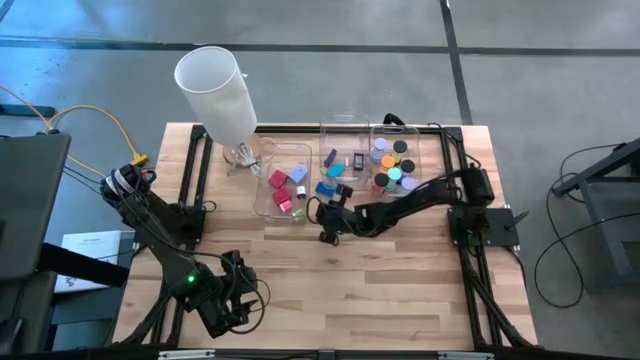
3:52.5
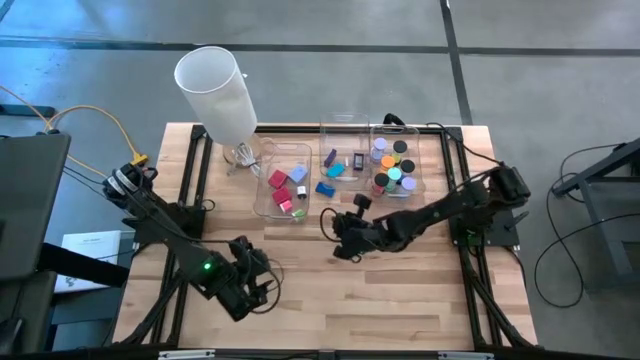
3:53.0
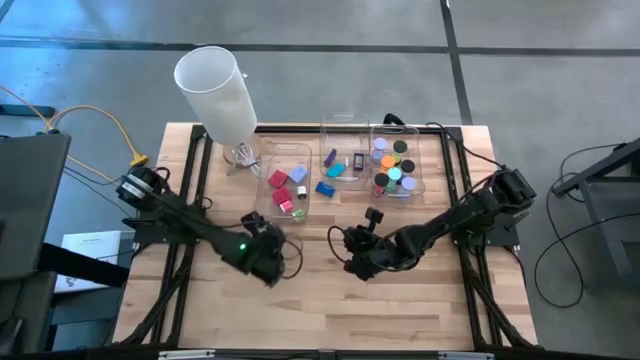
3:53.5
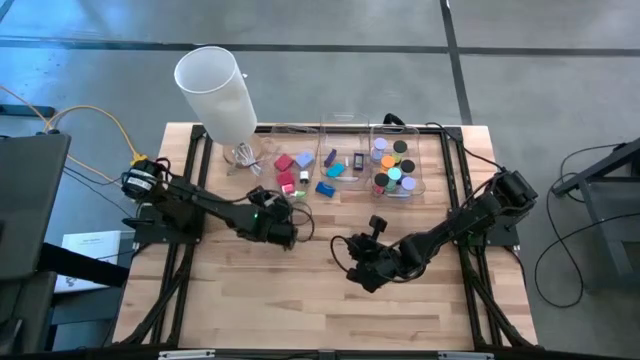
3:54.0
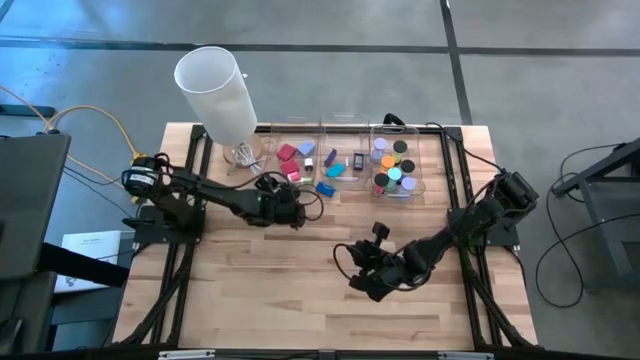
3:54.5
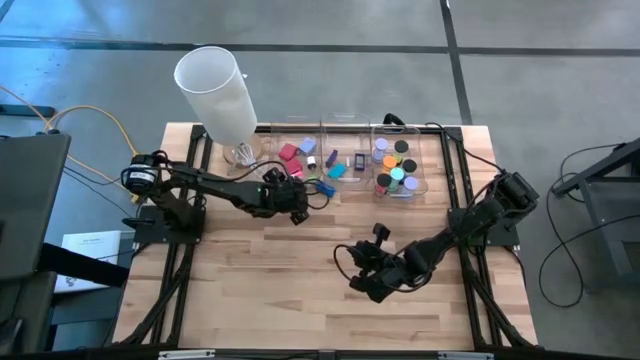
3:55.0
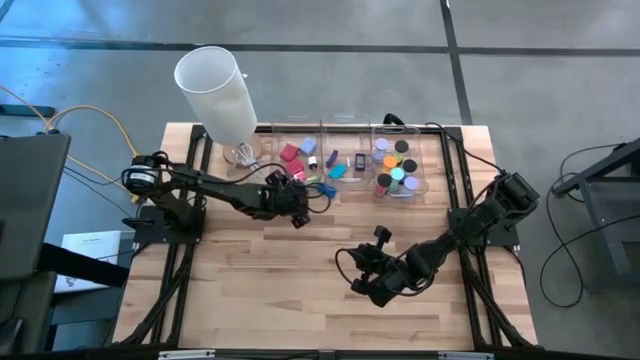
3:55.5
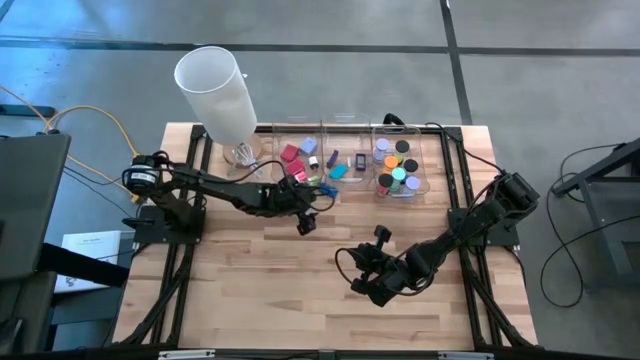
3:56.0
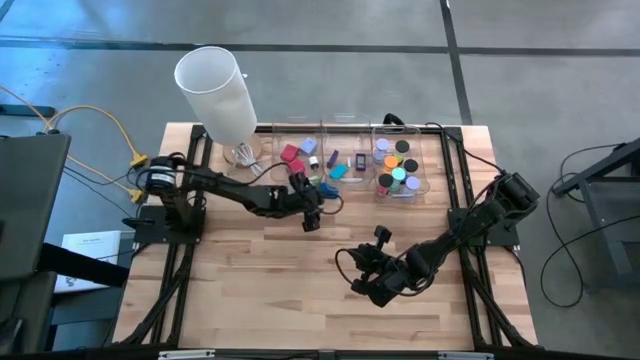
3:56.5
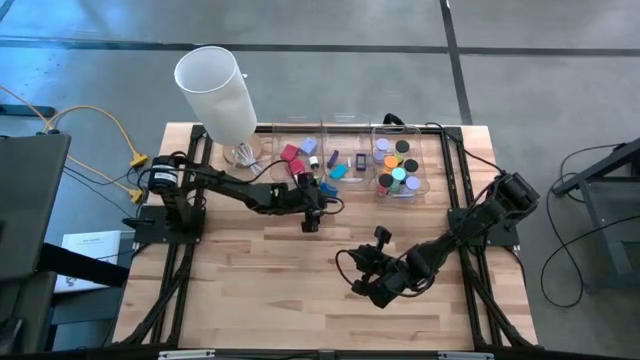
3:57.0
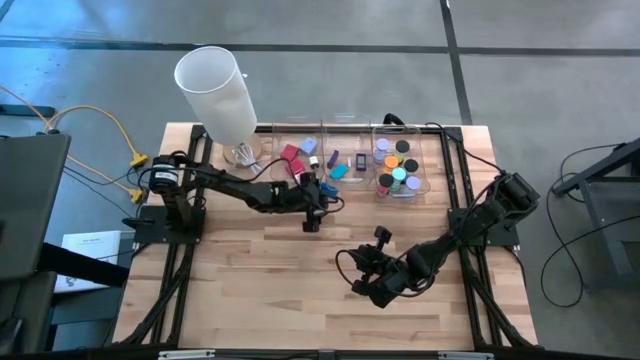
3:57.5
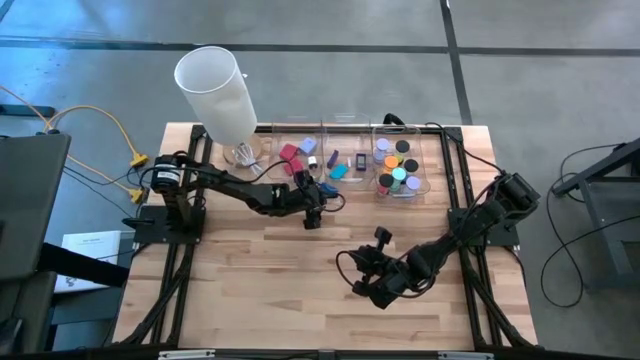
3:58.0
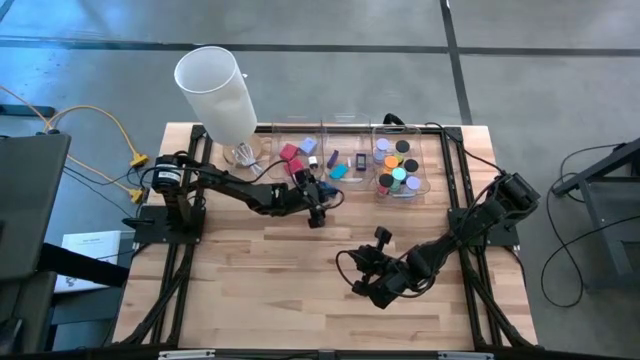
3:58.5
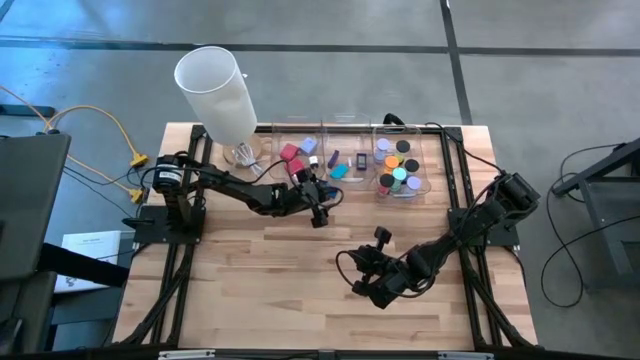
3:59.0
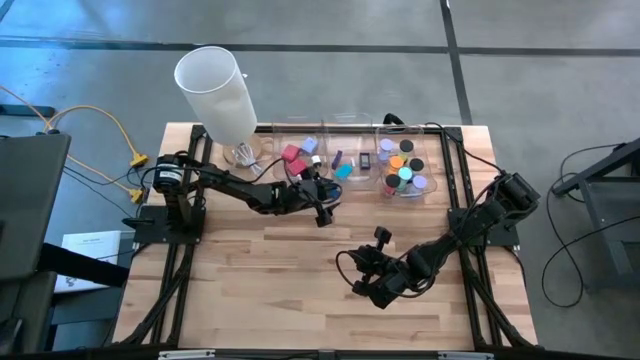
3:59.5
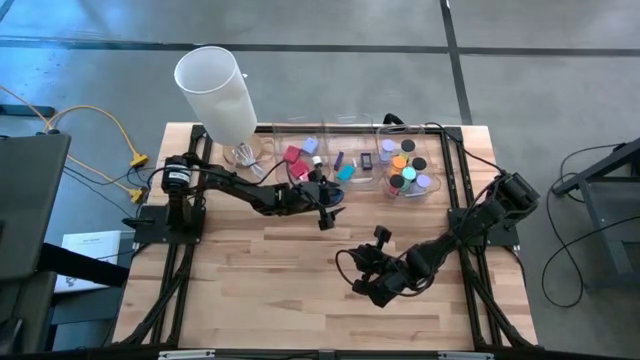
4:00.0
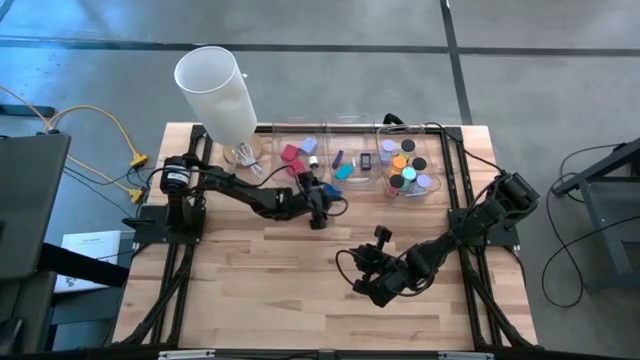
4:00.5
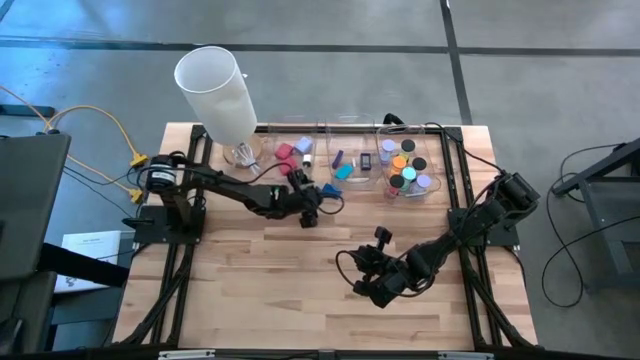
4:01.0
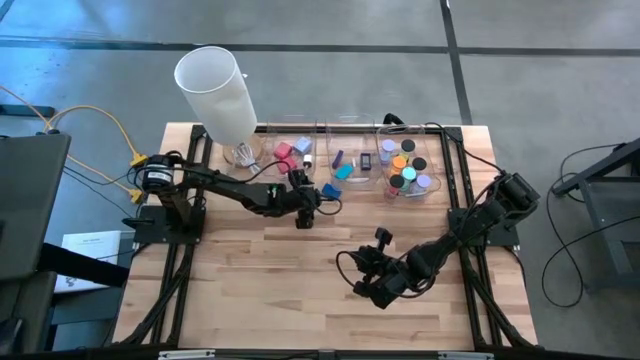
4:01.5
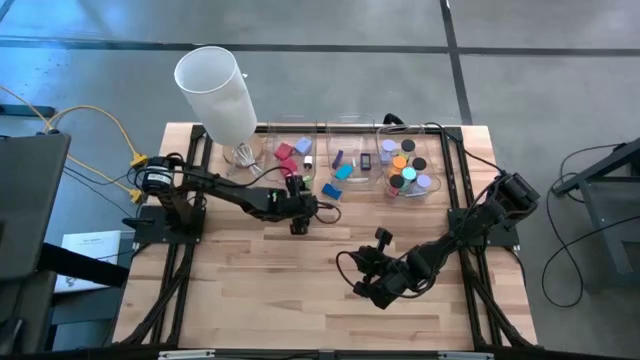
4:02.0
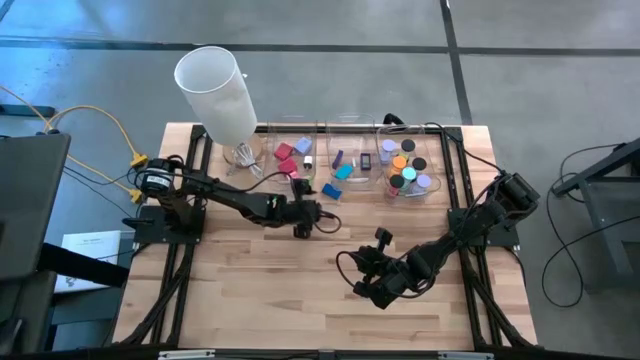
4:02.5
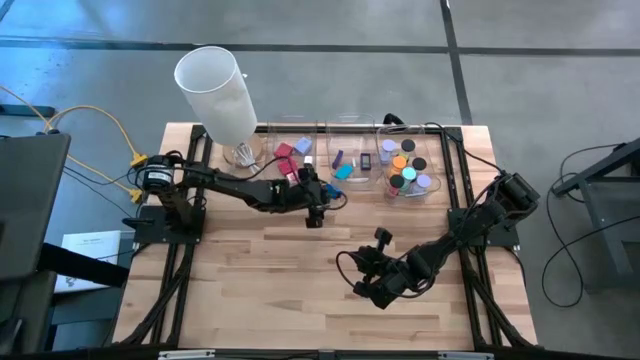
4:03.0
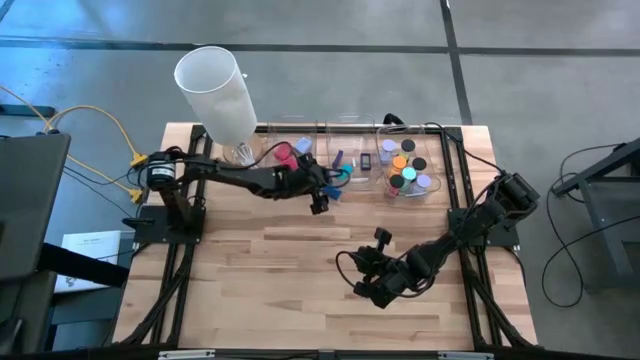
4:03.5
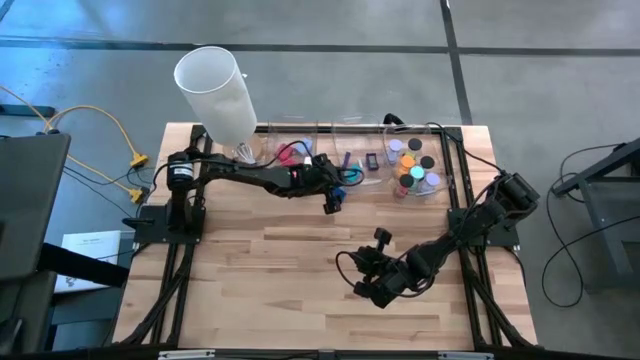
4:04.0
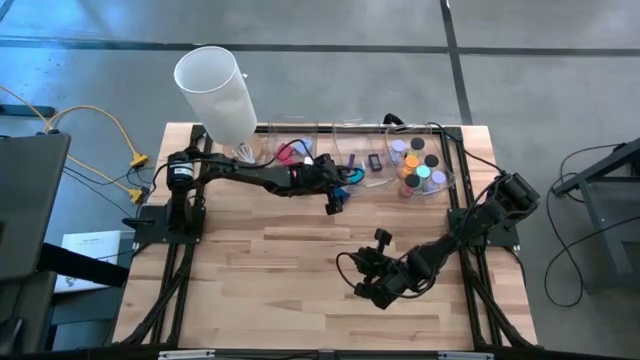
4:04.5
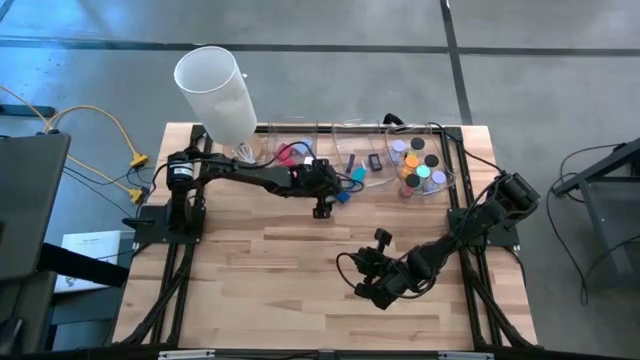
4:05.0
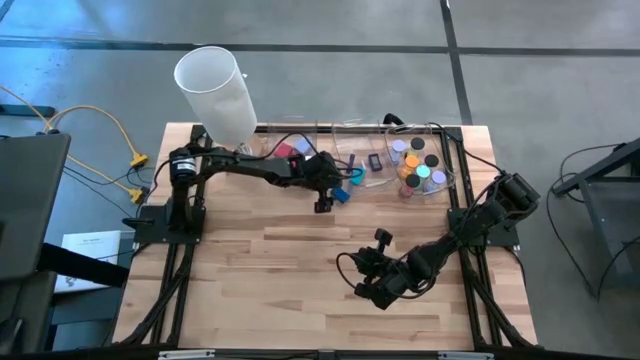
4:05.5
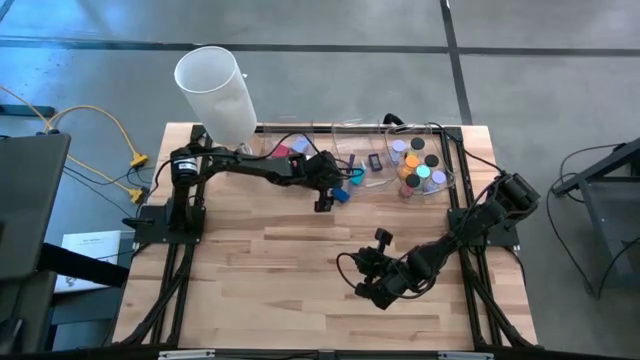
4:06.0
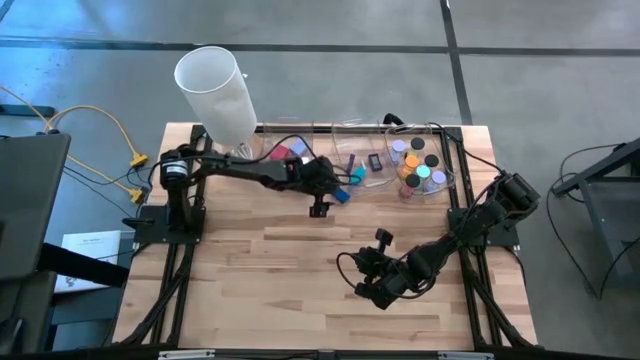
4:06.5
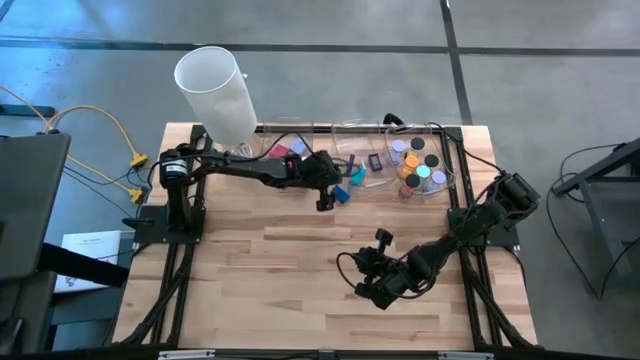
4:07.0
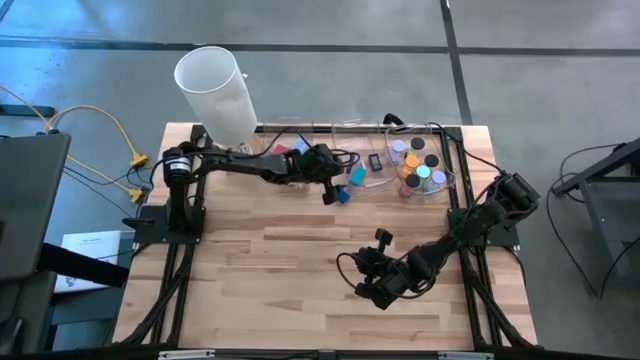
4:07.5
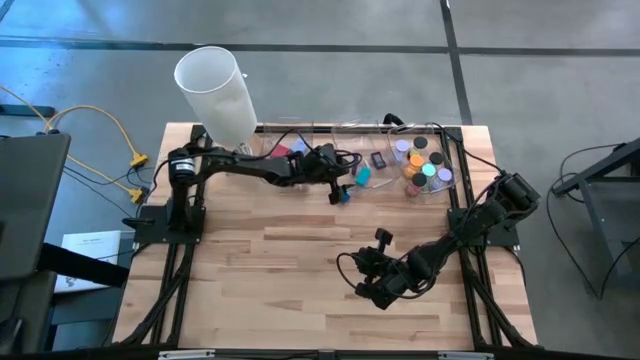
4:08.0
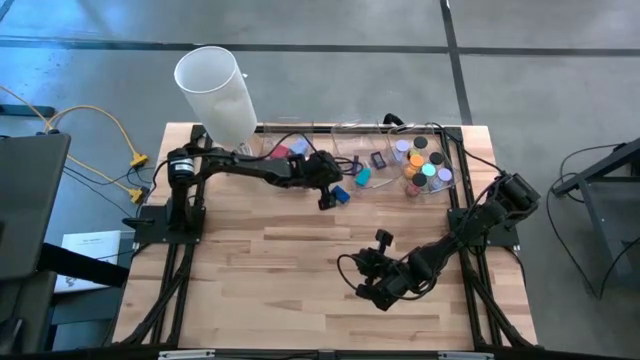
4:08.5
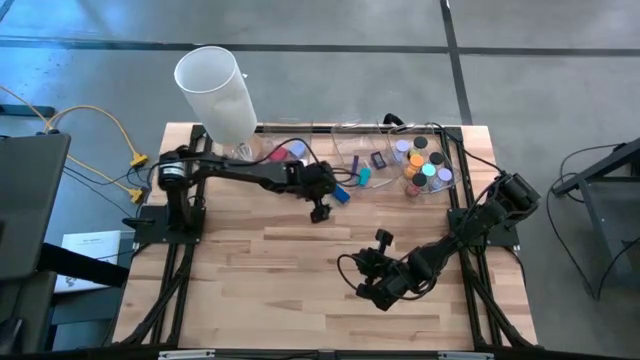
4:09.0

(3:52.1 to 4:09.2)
Task: Pick & Place Office items
Adjust the transparent bins

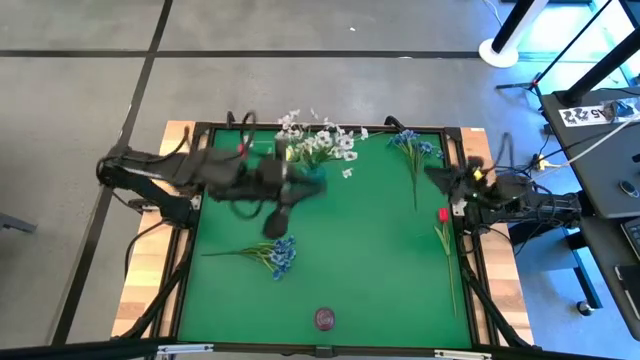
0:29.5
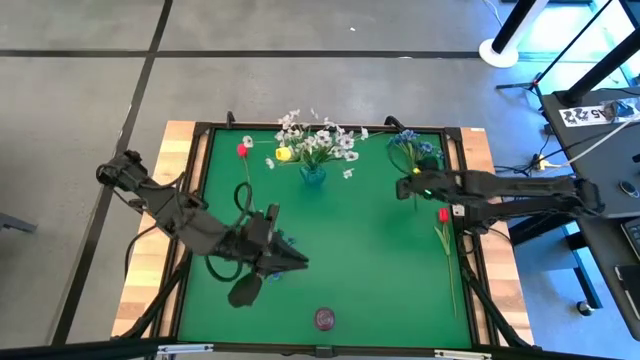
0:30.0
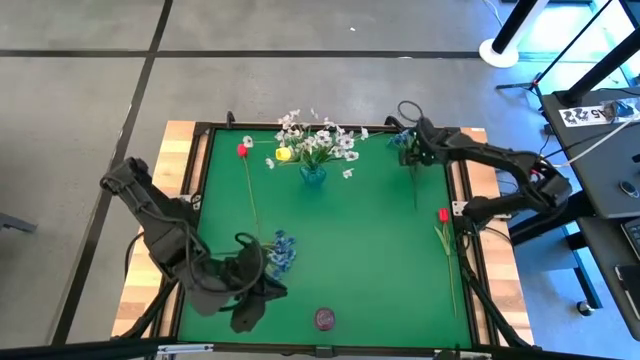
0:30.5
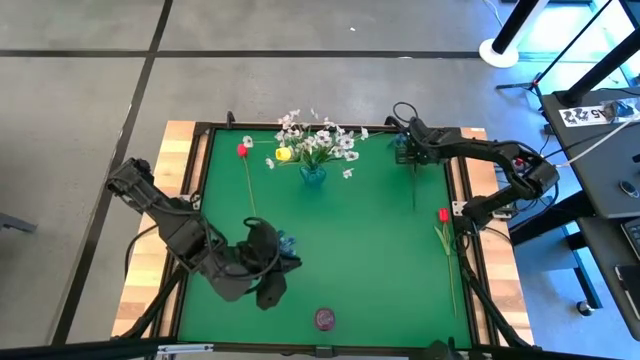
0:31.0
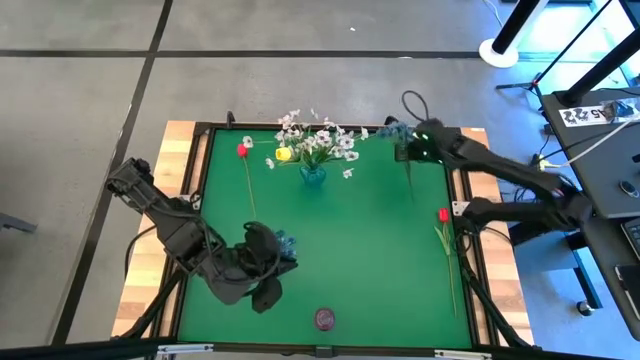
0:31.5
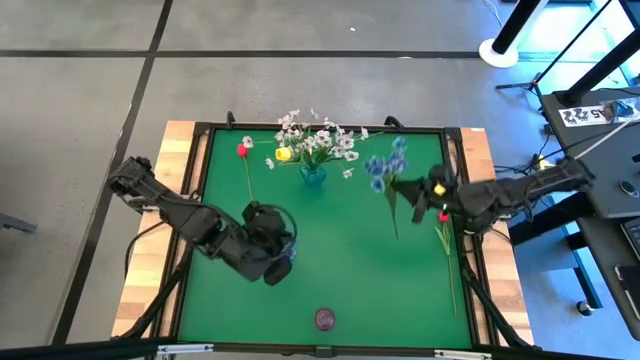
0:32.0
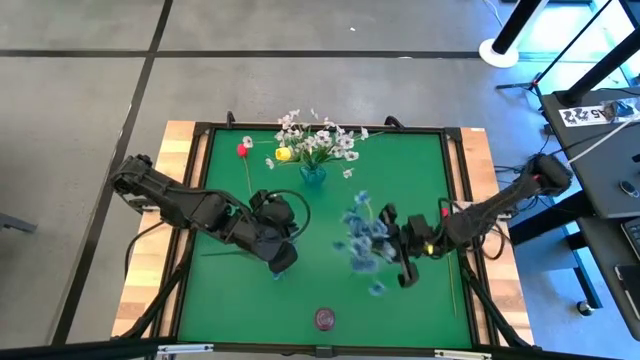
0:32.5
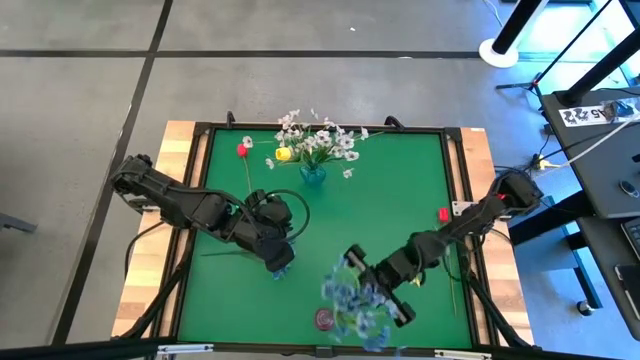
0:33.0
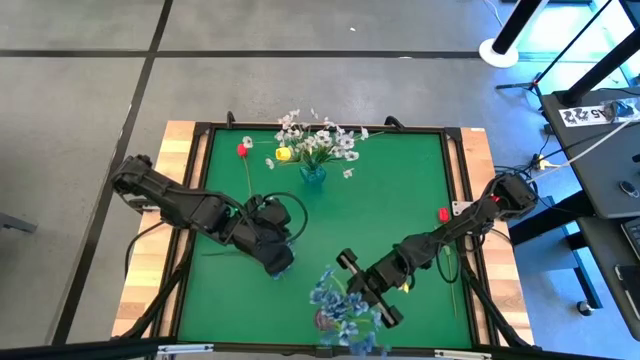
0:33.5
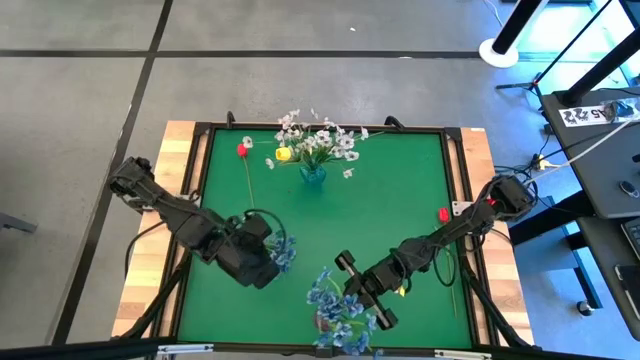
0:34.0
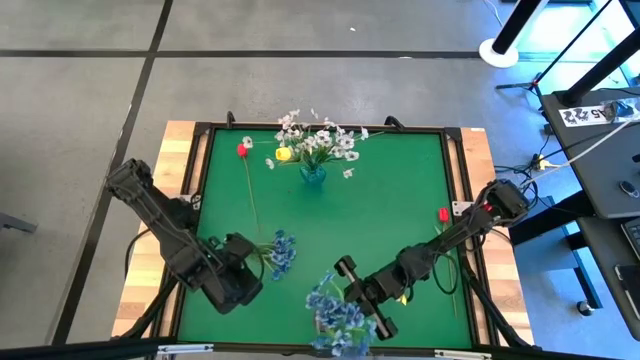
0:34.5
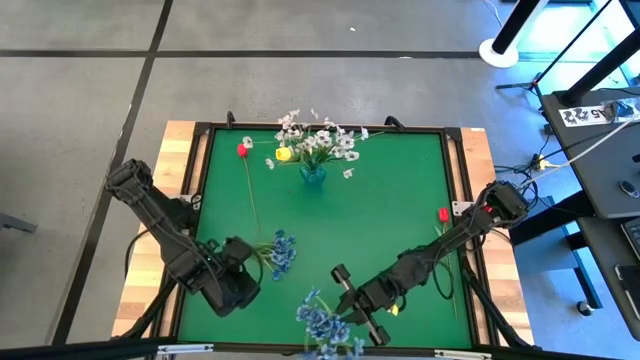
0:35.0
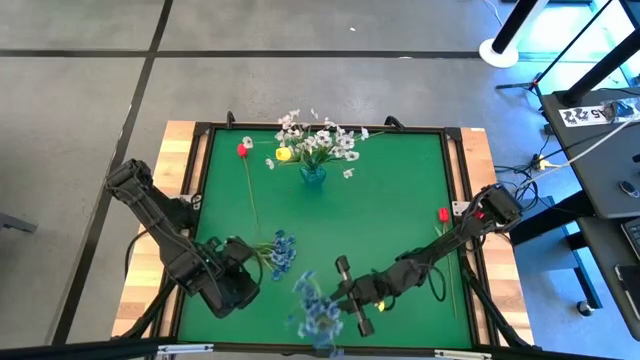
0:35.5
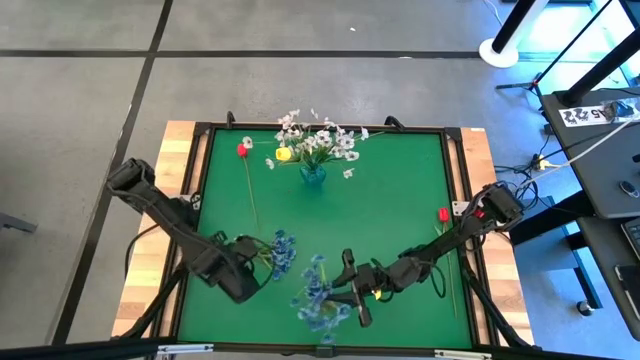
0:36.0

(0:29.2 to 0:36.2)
Task: Sort flowers into vase by color
Put the right blue flowers into the violet vase
